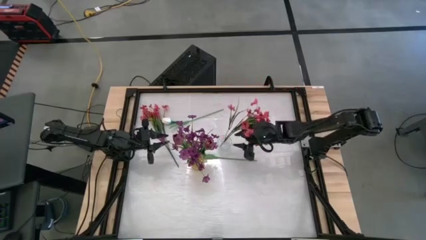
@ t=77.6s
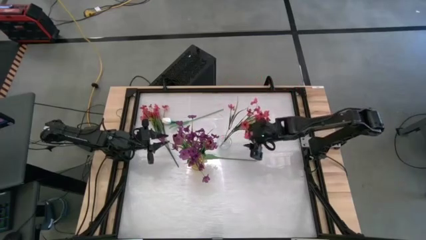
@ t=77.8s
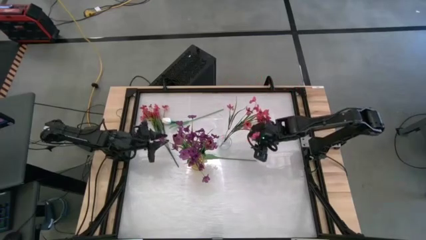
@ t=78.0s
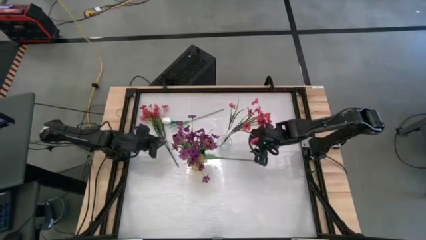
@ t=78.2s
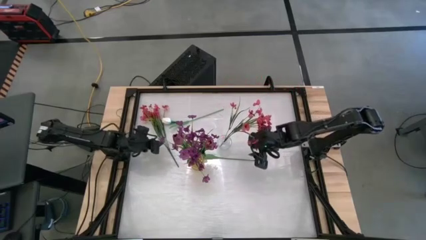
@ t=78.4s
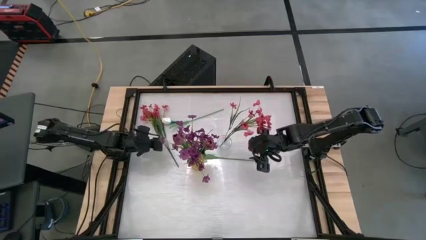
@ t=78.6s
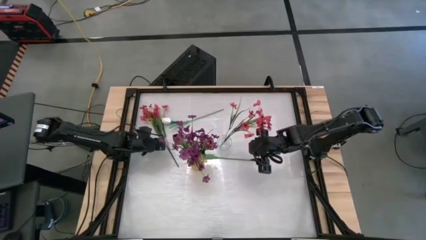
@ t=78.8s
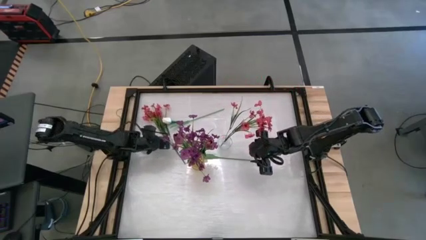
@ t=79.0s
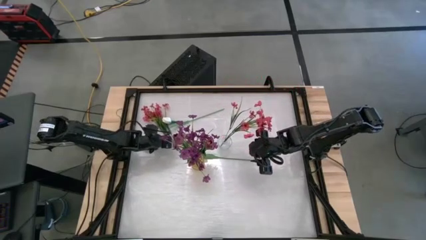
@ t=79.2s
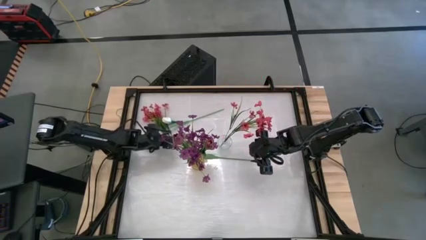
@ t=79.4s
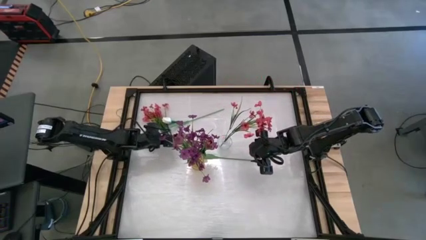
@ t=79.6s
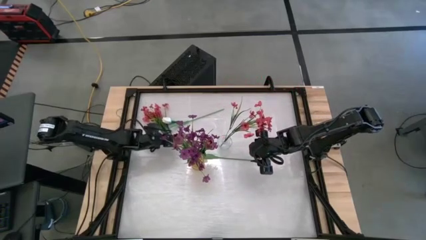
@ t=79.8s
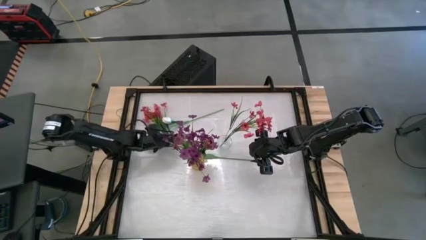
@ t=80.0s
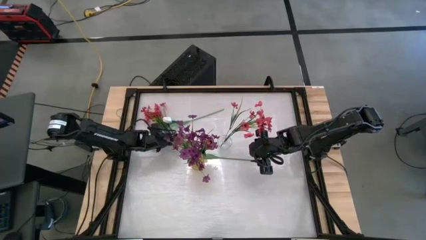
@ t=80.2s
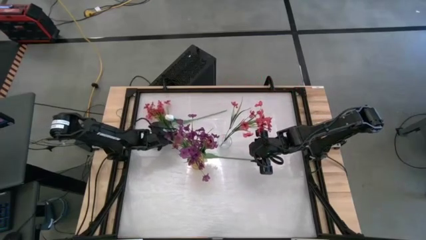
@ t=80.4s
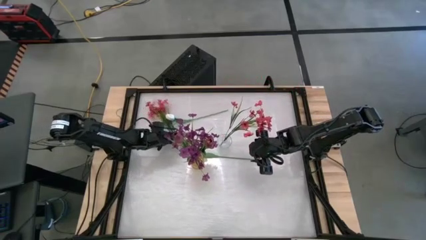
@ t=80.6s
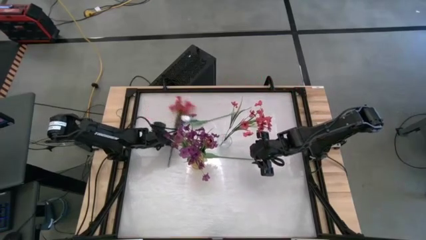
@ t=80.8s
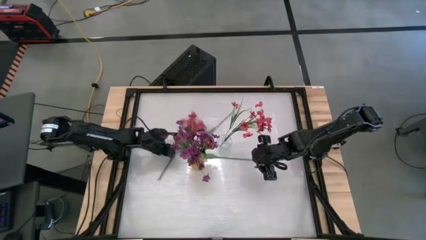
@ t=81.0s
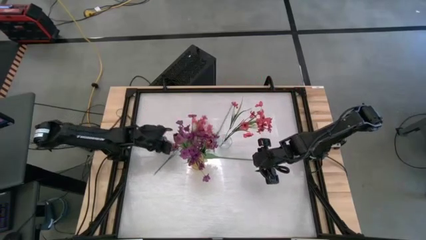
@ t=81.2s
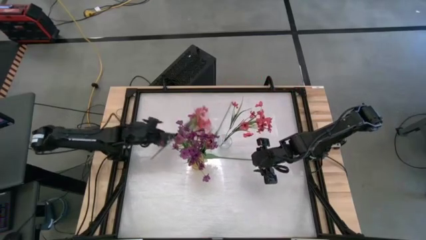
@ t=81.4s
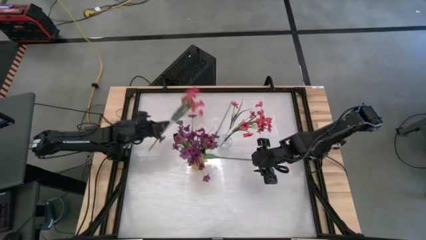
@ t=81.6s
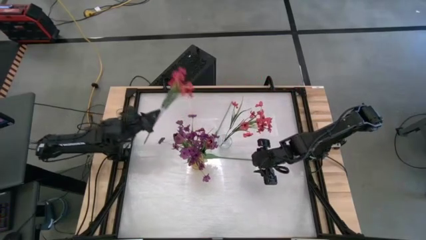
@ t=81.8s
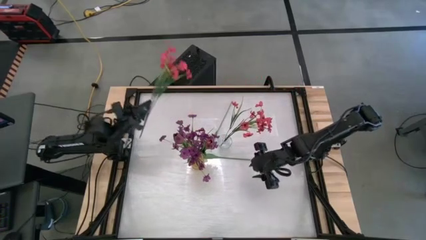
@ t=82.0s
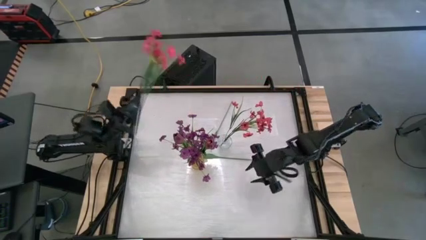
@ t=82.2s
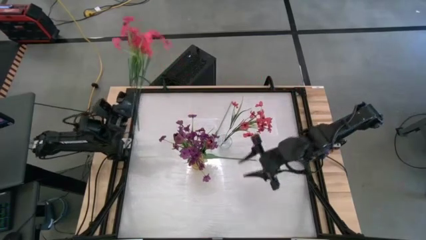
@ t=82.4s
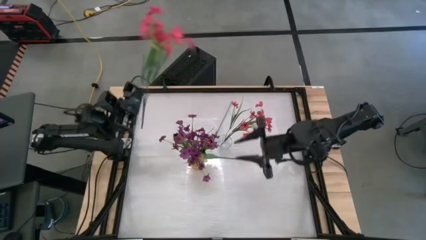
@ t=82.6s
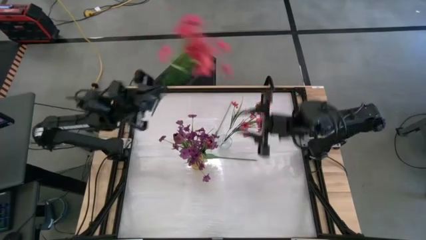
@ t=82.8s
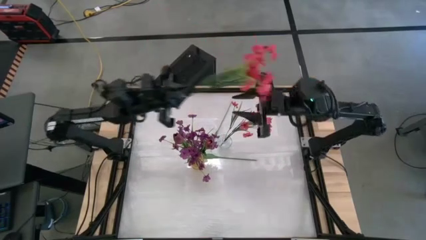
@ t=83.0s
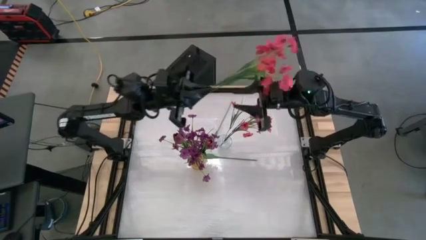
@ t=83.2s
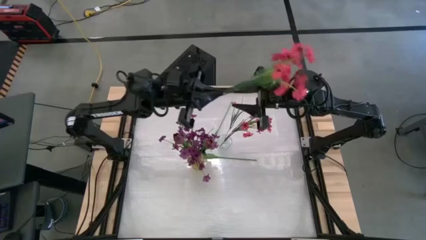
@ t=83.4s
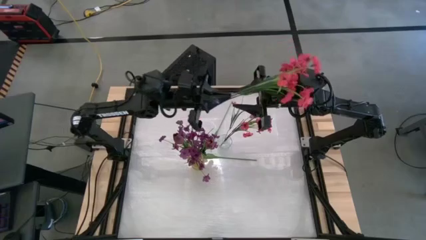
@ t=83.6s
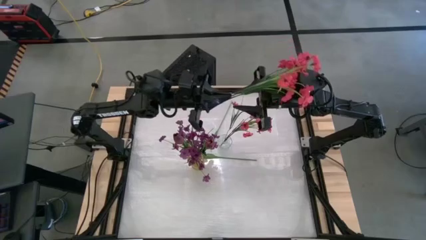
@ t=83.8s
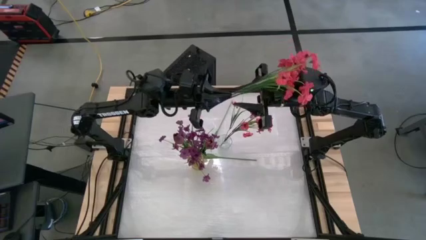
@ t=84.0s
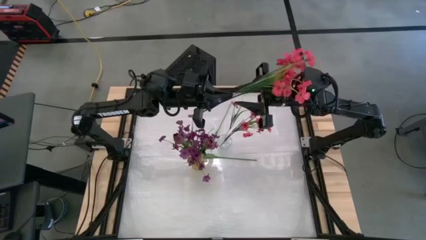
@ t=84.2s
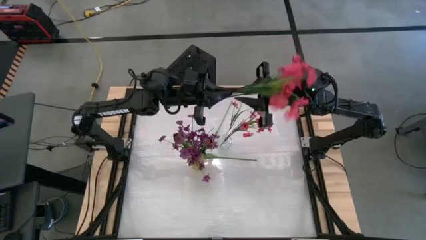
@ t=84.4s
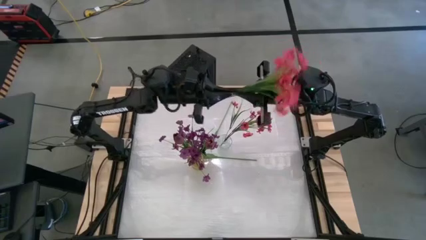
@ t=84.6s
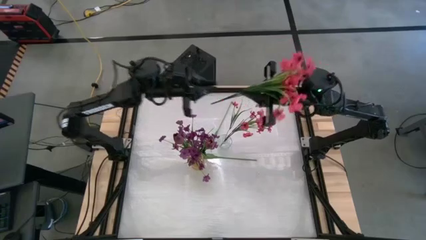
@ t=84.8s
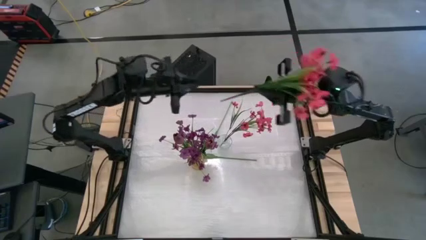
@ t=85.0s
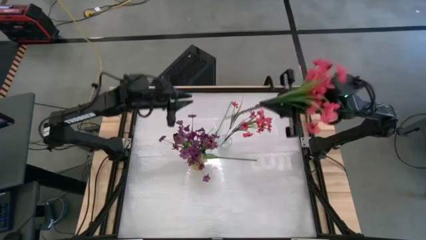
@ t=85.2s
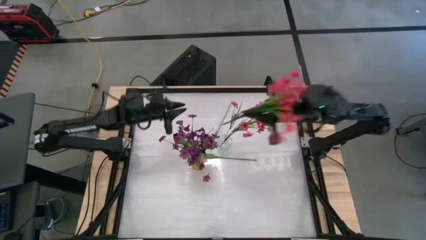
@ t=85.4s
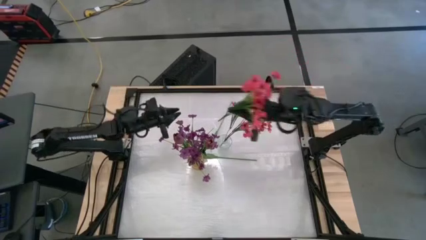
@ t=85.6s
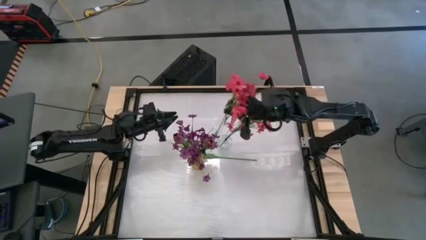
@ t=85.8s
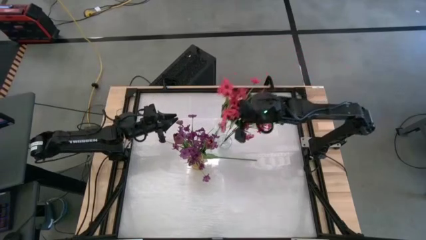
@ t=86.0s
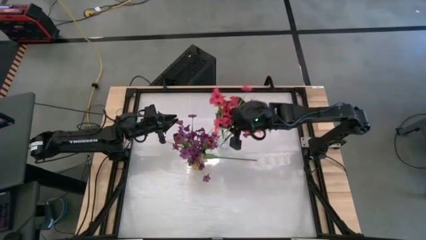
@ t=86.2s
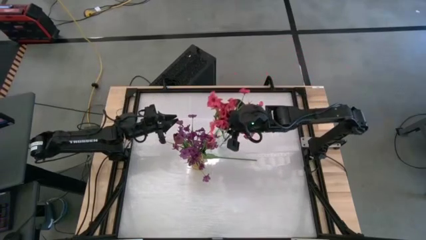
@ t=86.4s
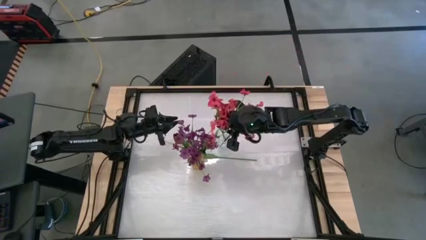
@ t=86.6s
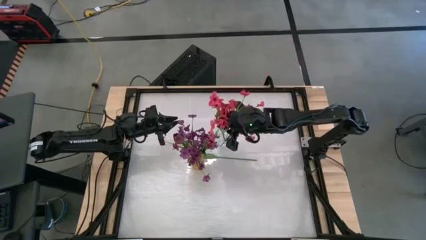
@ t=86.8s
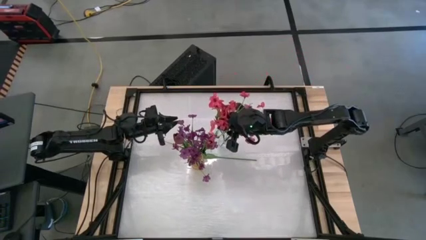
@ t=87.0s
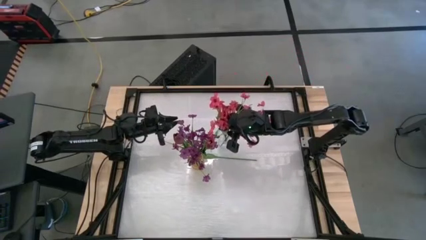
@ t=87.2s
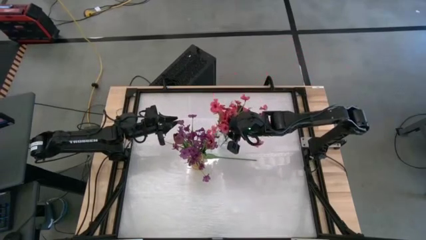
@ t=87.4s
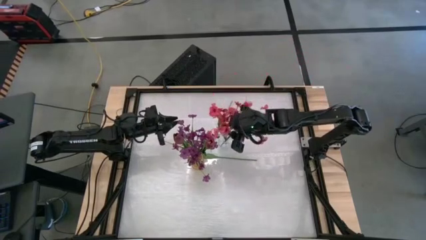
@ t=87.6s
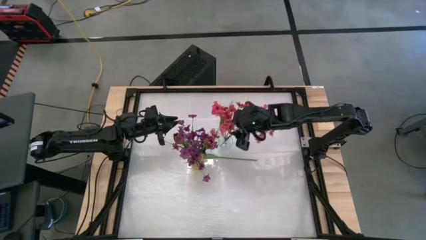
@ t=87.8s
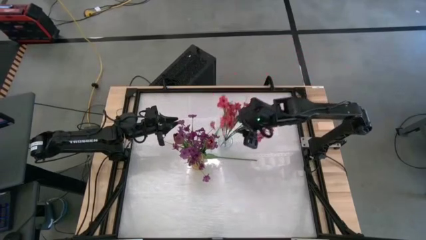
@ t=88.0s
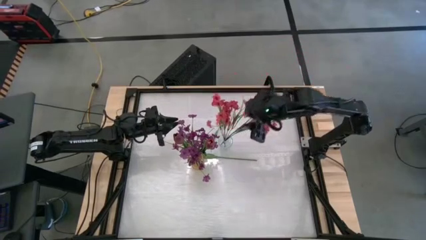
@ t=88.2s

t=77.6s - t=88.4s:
Task: Sort flowers into vase by color
Put the red flowers into the transparent vase

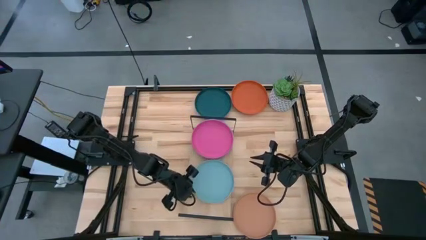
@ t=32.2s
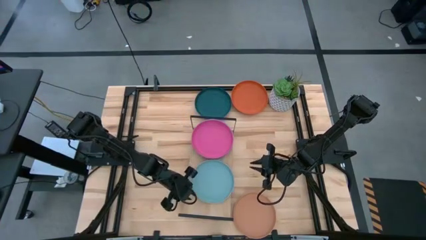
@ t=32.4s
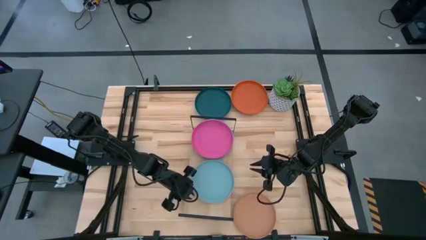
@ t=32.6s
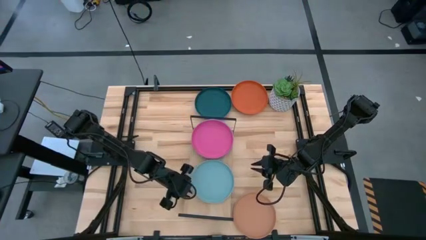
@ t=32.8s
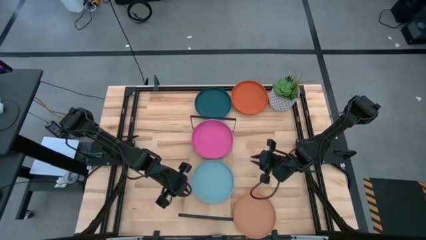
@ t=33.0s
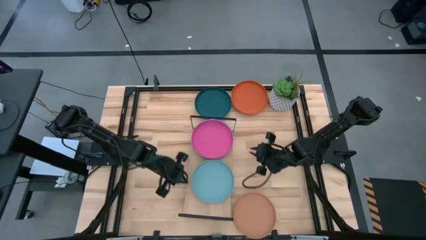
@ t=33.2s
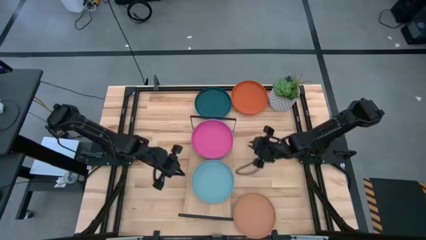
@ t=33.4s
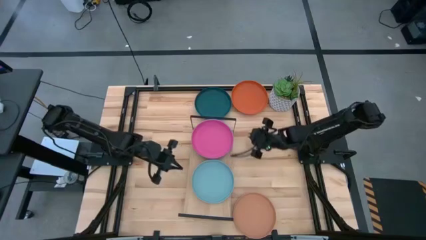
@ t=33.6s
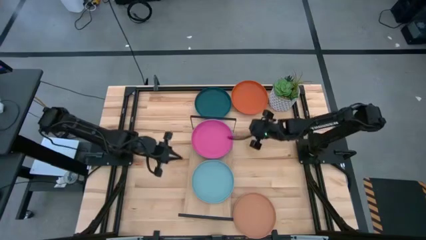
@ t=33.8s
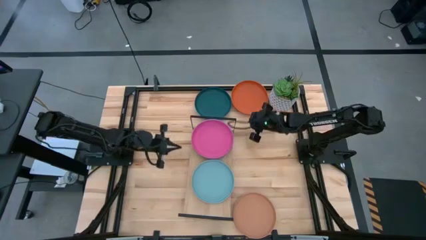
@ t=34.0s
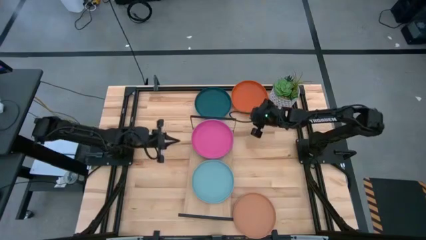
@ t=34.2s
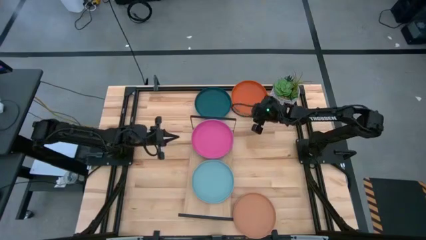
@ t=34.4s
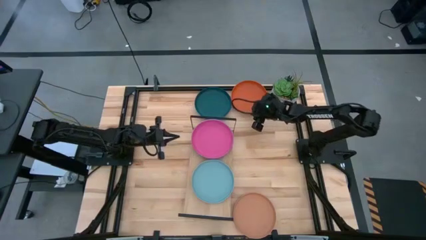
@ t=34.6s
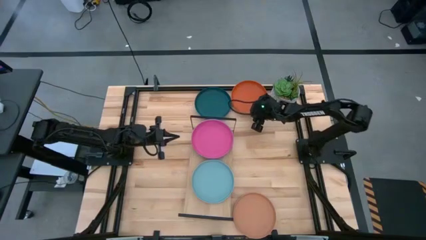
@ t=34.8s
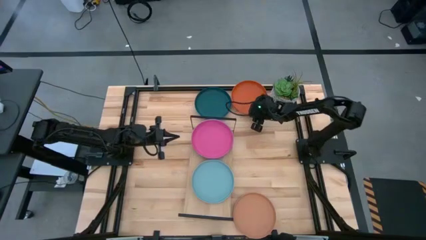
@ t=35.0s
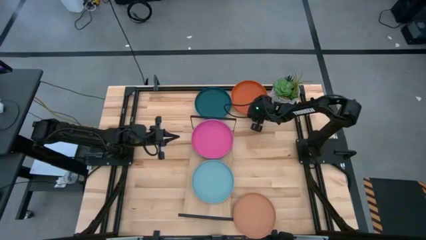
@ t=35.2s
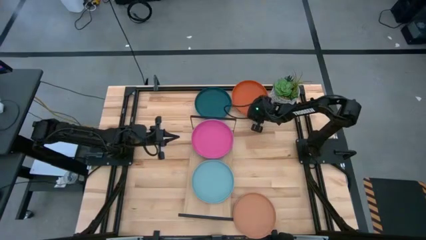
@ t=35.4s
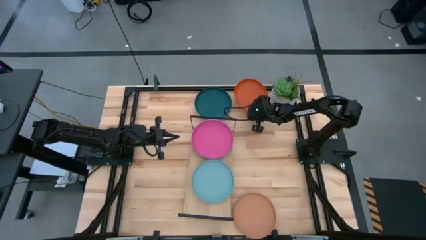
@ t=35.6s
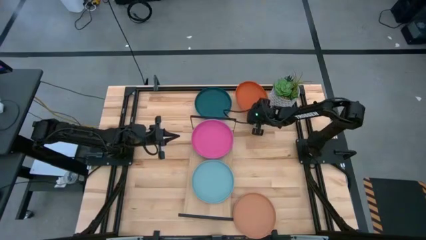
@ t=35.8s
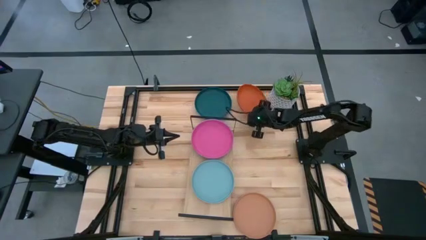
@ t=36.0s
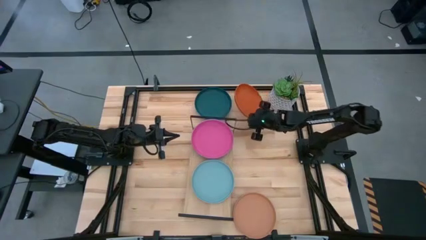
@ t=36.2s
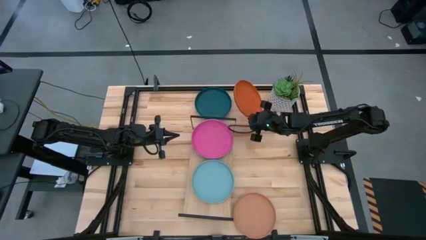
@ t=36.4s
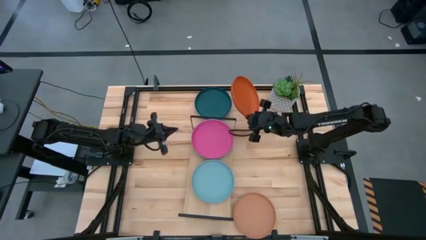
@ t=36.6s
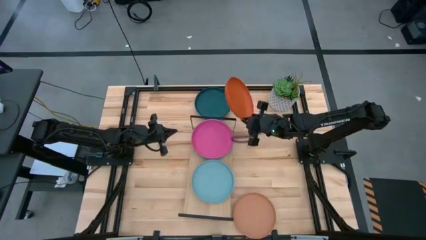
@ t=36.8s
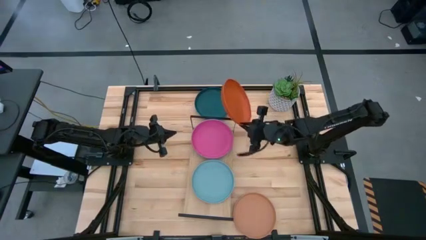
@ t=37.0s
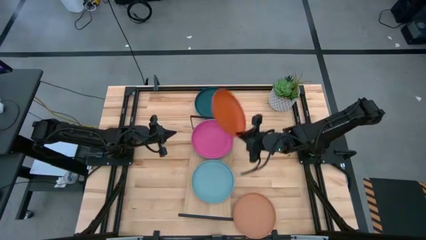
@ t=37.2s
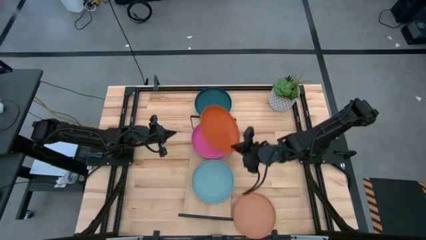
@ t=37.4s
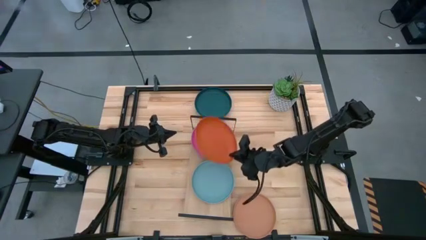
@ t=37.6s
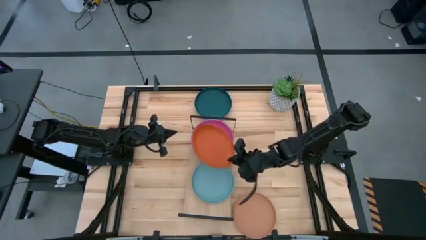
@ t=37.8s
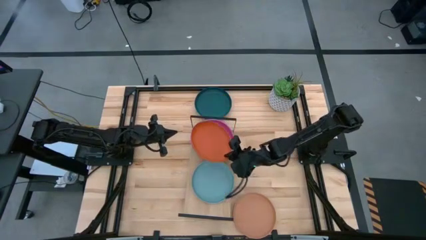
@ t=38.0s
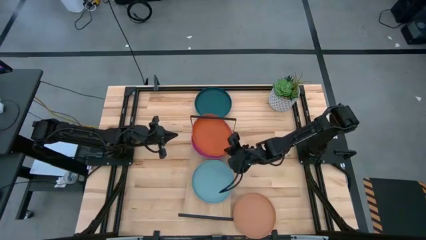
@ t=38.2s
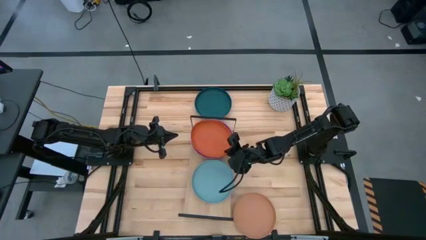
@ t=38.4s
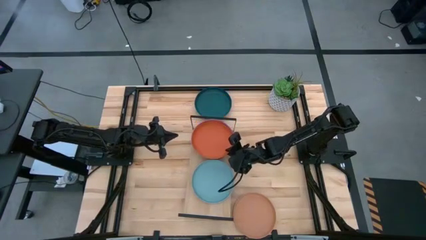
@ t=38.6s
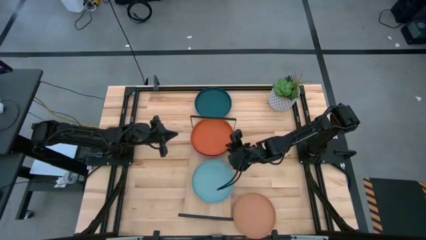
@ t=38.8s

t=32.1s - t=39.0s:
Task: Place and stack plates onto a shelf
Stack the orange plate on top of the pink plate on the shelf
